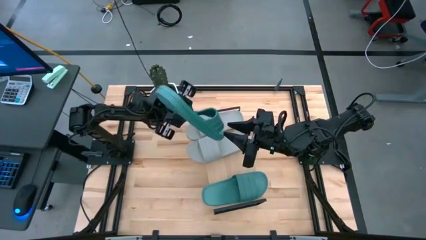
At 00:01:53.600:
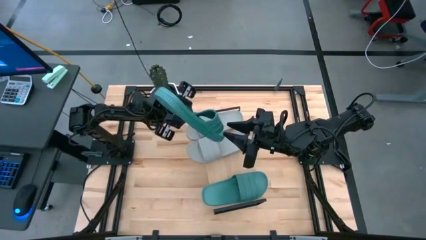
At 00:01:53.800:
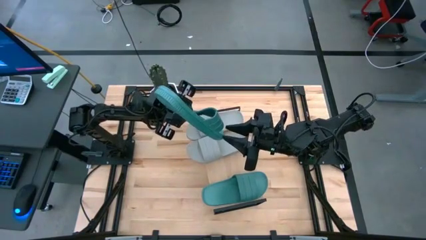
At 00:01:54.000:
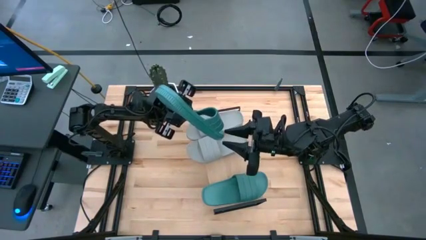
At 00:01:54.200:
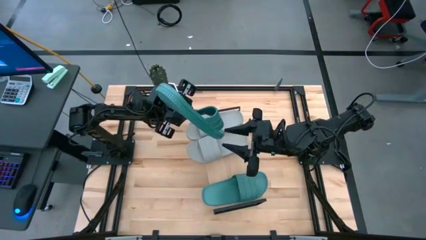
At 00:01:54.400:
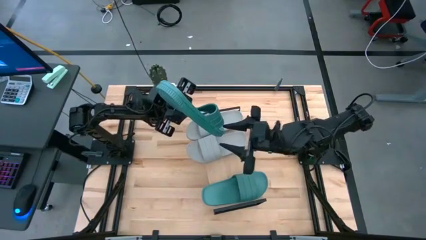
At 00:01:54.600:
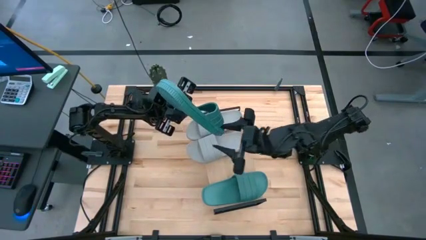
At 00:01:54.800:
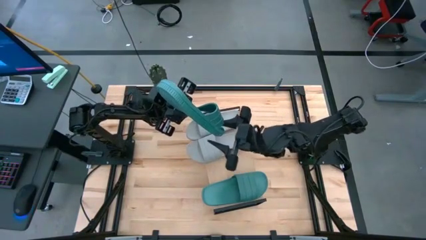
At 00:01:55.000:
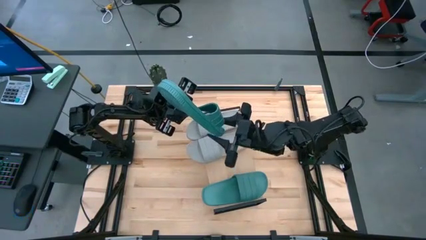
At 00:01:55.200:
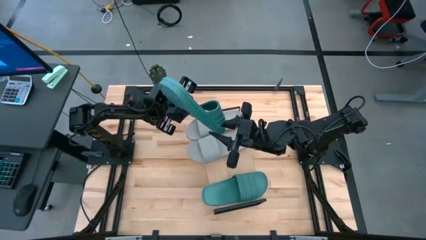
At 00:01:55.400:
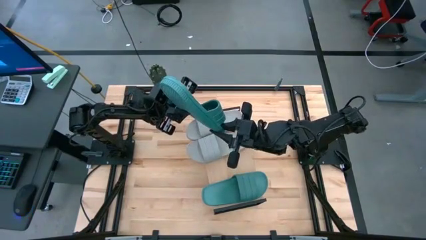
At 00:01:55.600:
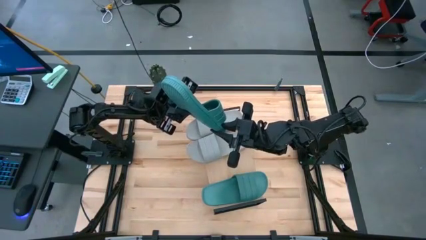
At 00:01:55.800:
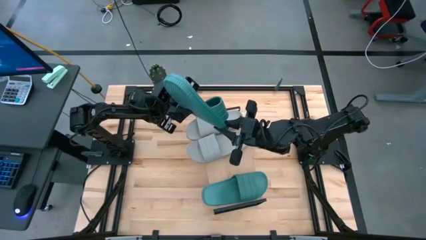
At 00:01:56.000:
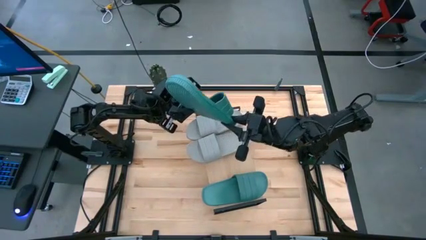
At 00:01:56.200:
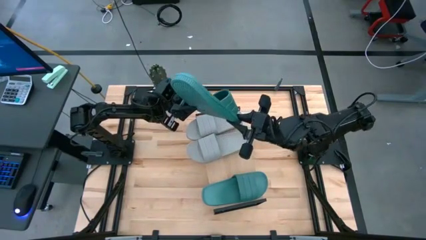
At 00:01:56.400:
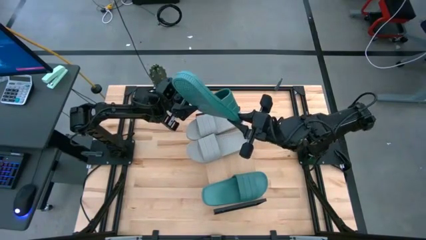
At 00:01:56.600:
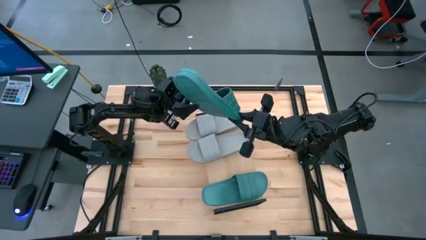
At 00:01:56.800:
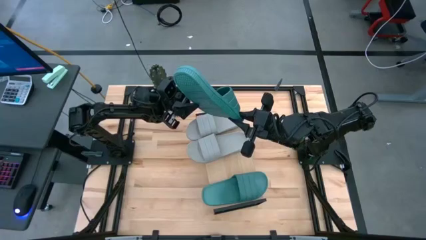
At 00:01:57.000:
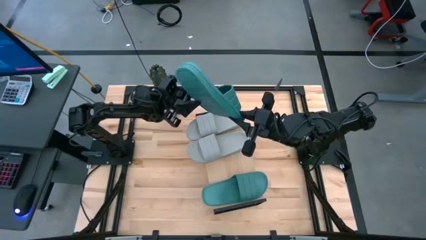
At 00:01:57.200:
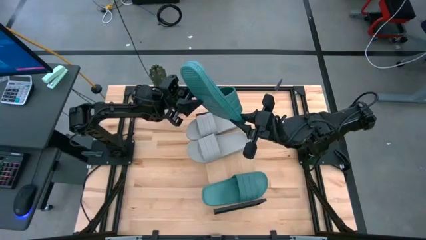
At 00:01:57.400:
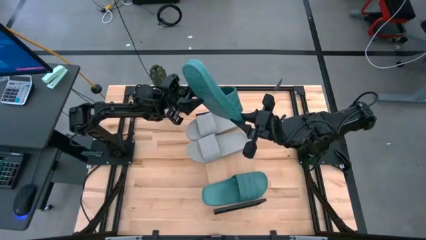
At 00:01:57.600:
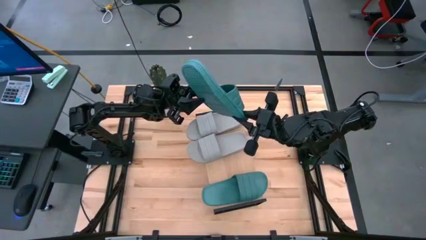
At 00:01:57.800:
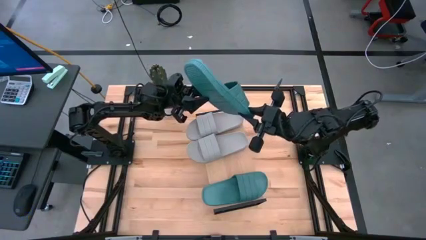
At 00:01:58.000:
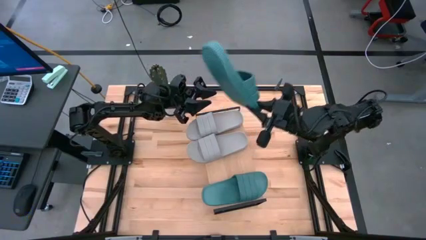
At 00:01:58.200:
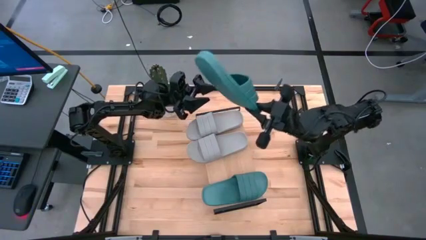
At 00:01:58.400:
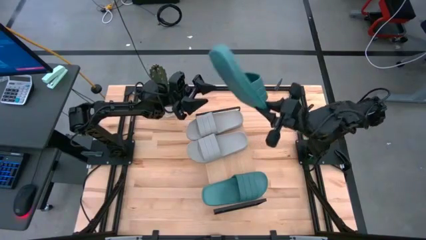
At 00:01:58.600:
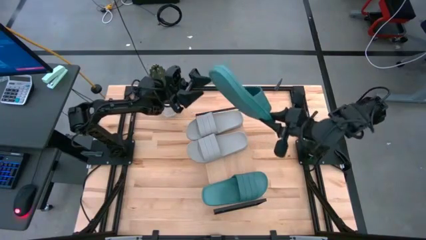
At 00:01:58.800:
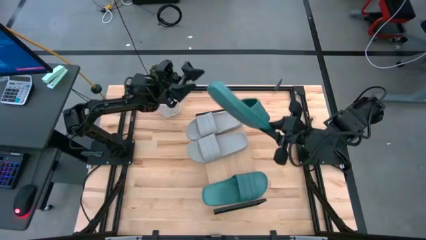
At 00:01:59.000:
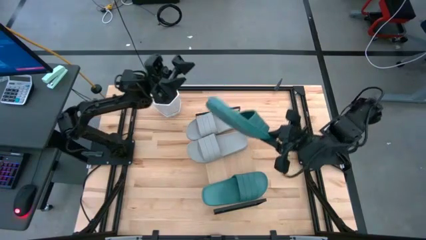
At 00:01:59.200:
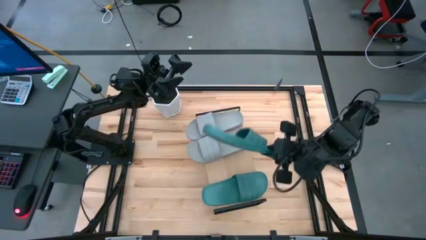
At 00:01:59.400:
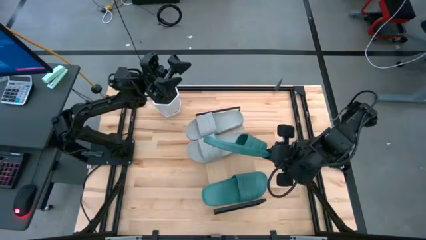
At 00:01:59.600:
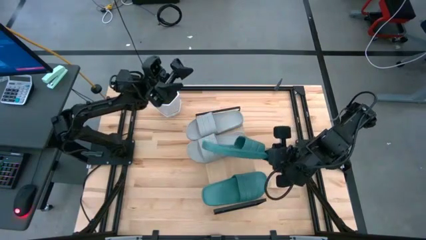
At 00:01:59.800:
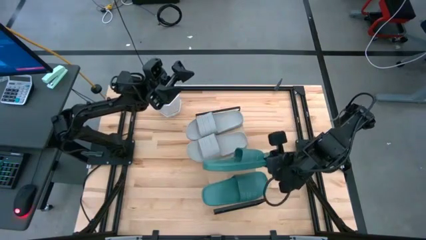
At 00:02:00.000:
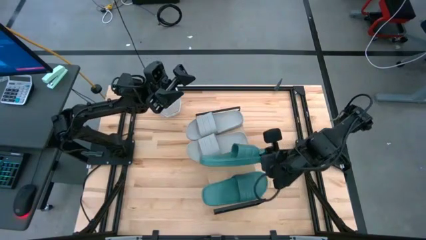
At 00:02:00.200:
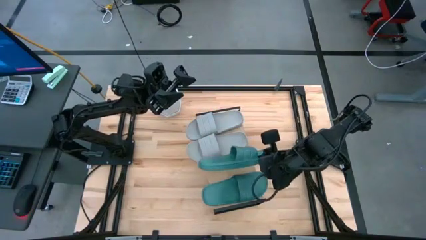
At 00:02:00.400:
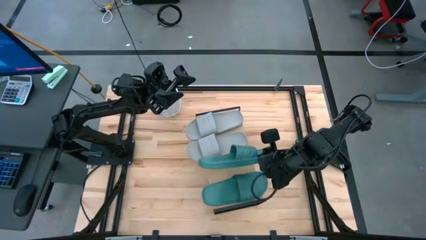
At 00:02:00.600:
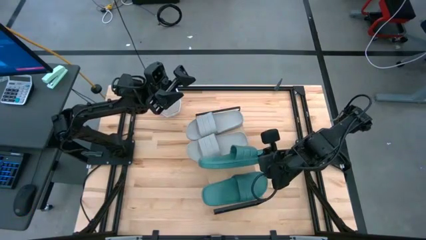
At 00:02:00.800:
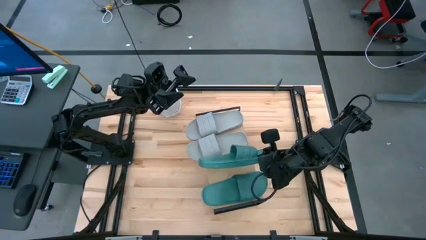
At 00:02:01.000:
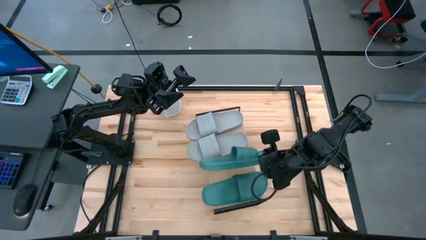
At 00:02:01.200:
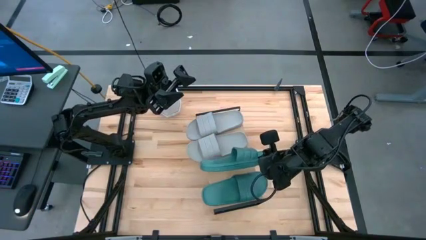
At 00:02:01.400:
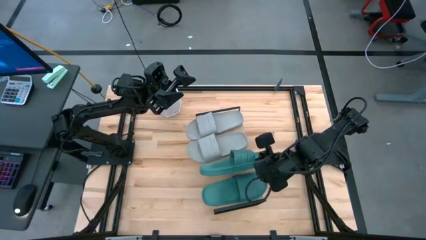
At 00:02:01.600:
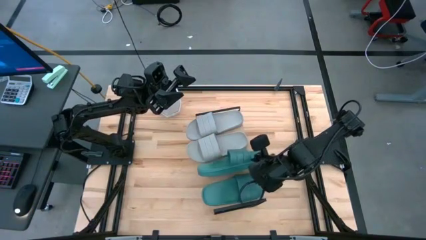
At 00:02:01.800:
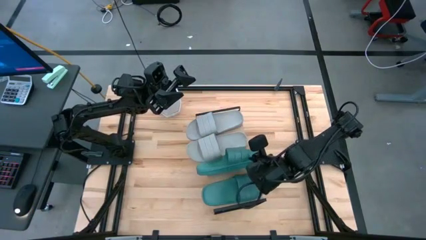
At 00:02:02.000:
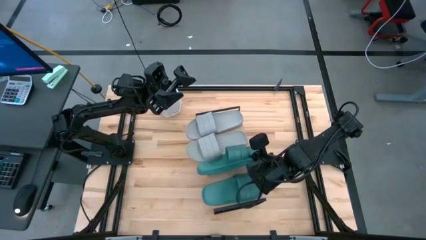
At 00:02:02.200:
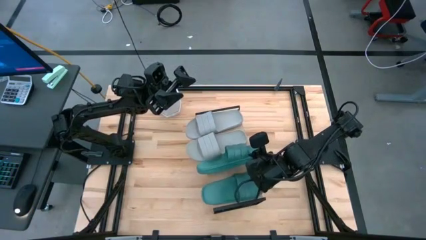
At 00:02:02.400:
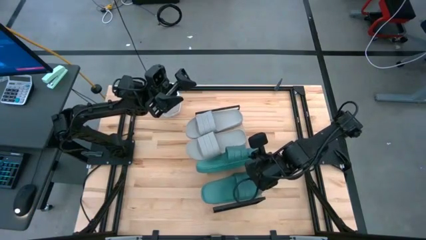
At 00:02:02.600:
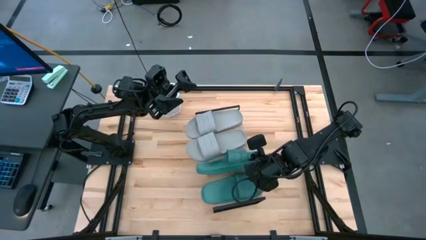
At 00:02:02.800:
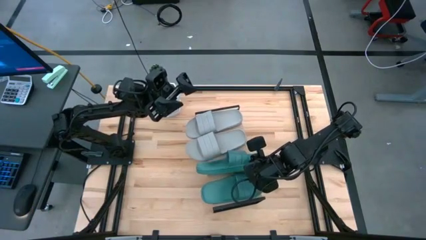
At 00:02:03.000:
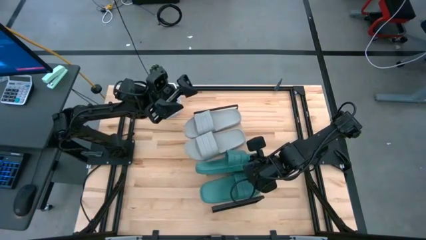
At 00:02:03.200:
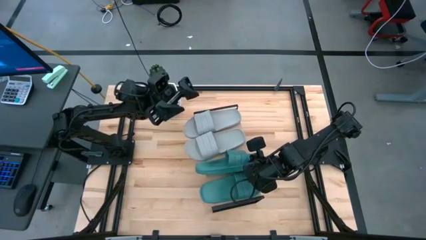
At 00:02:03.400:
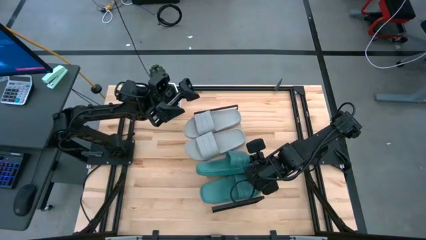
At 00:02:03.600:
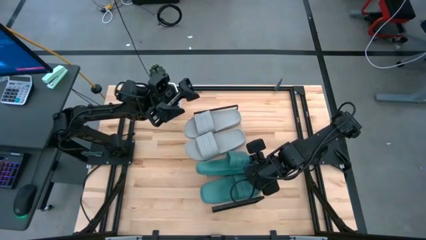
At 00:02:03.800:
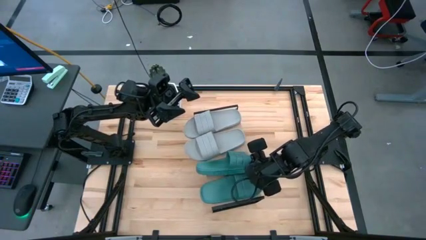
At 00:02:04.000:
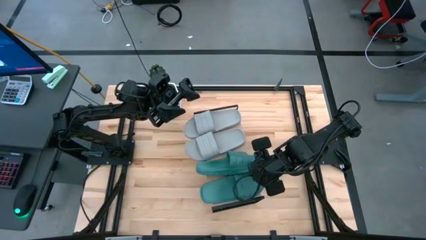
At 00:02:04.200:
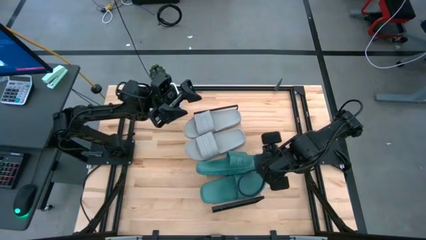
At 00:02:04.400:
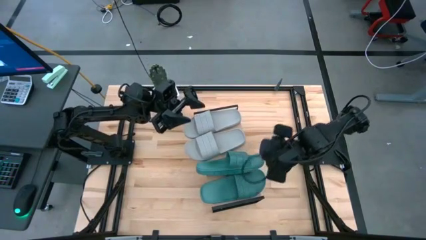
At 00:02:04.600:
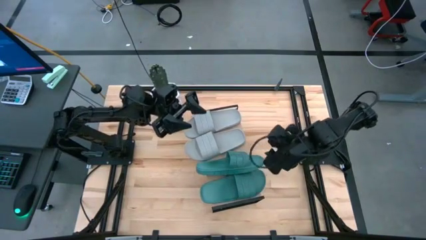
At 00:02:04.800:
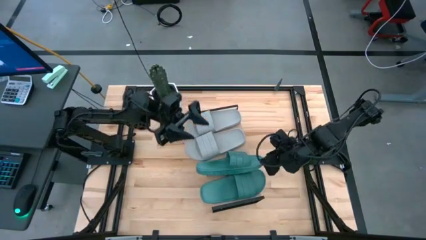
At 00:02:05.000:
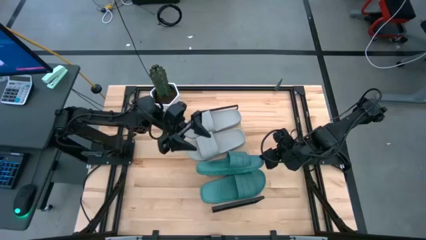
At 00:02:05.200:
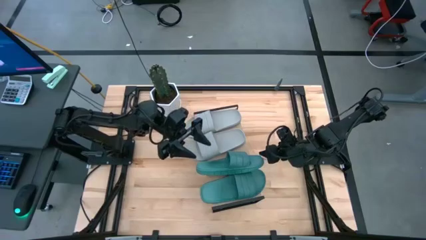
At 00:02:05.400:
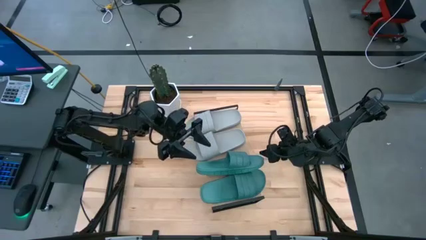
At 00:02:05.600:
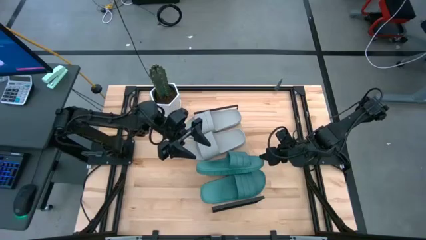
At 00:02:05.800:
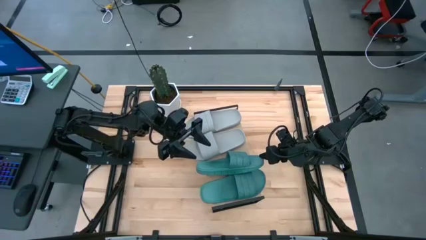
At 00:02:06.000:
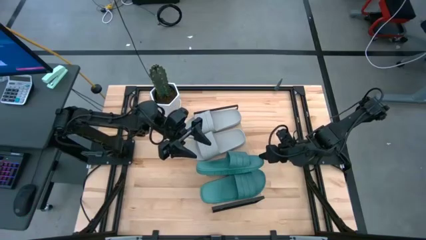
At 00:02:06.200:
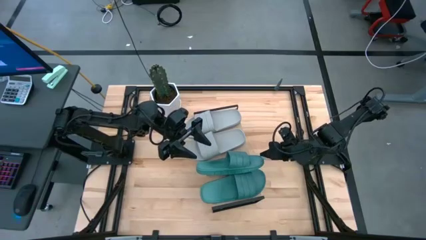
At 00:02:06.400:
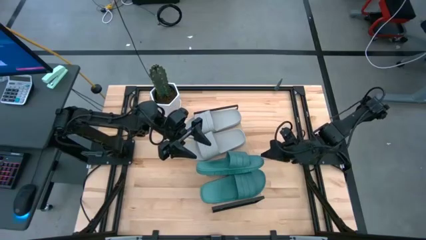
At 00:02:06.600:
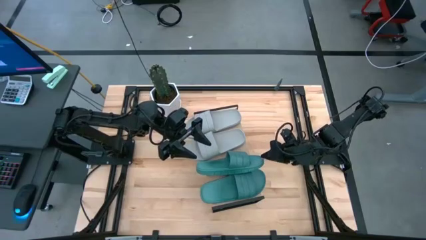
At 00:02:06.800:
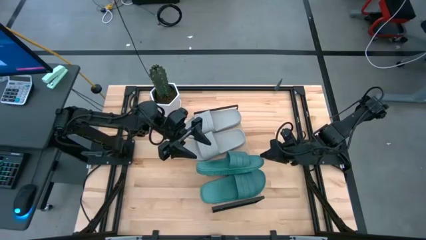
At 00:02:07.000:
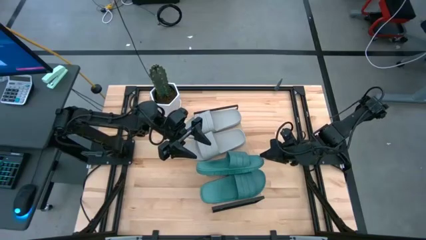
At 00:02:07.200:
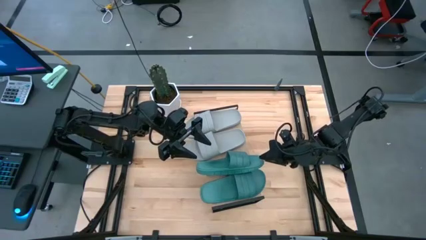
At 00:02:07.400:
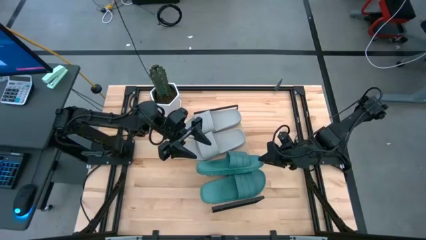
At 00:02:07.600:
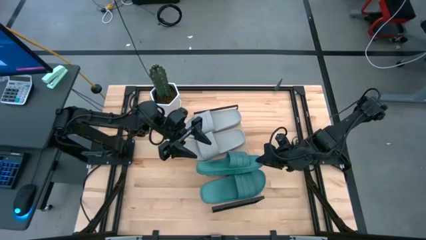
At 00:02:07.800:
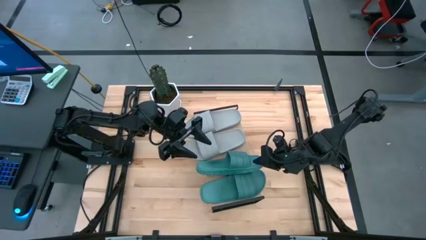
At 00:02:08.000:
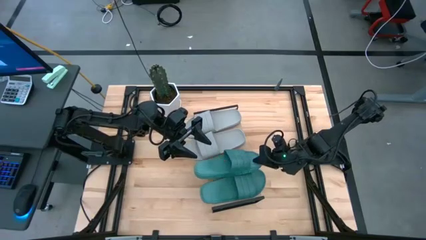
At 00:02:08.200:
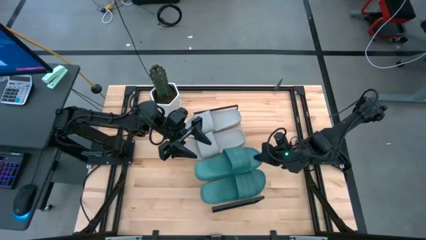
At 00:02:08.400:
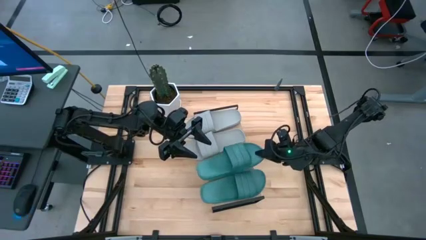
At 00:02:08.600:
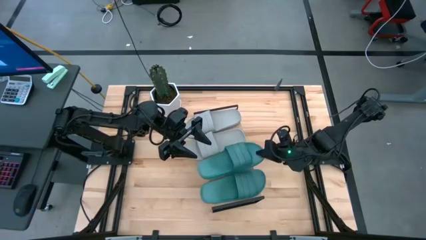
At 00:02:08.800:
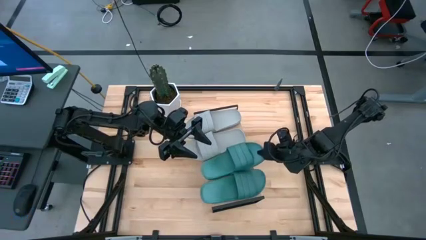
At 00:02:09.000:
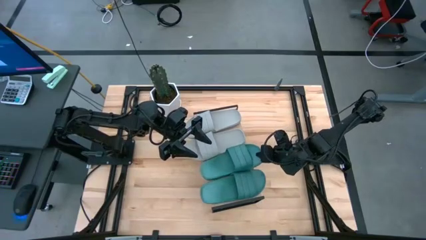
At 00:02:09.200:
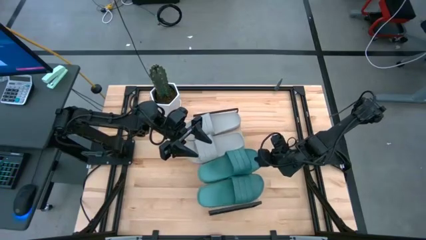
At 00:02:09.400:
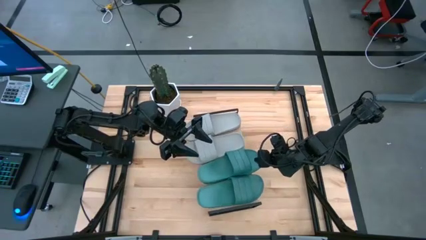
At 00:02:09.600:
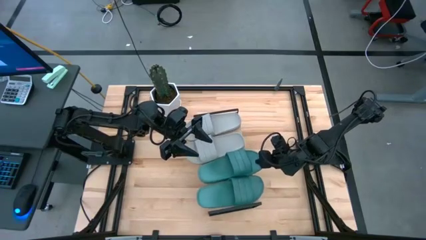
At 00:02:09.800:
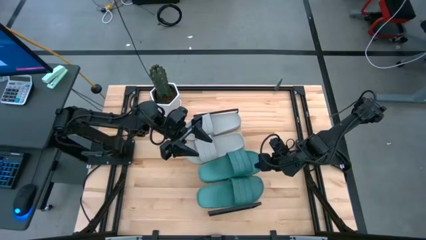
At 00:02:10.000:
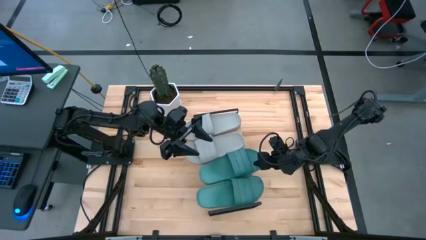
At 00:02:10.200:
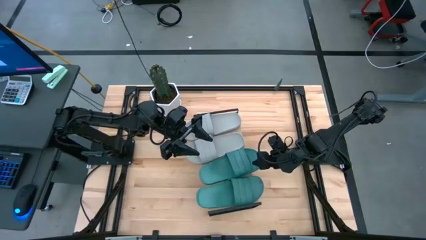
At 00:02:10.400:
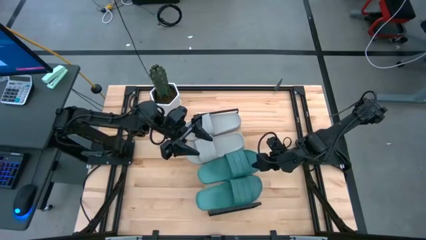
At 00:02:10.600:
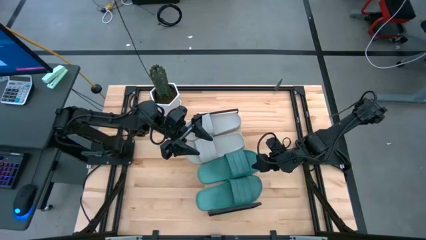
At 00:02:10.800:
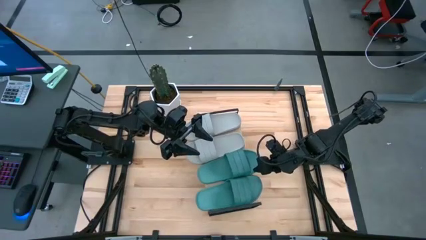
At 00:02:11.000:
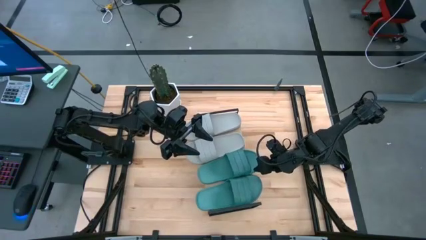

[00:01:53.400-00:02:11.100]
Task: Pick and place slides into the shelf
Put the green slipper on the shelf
